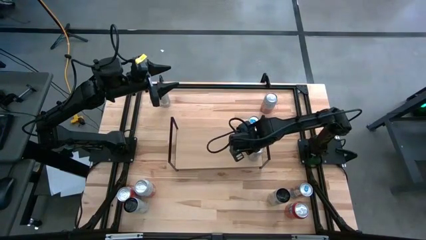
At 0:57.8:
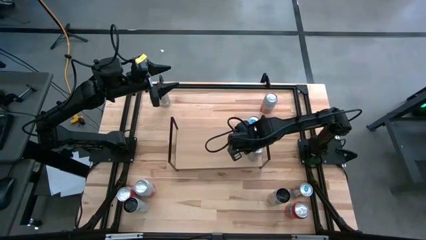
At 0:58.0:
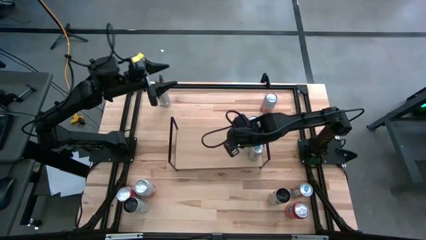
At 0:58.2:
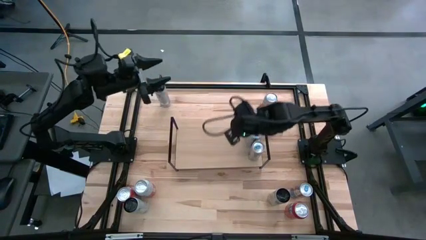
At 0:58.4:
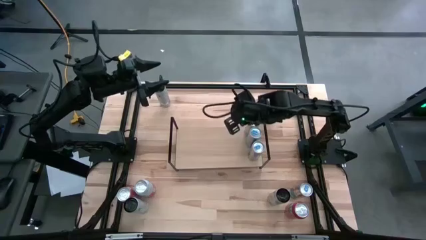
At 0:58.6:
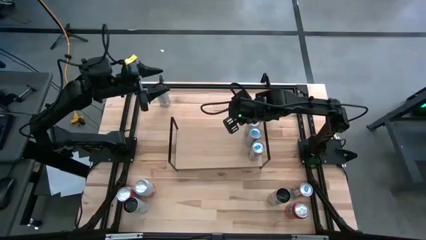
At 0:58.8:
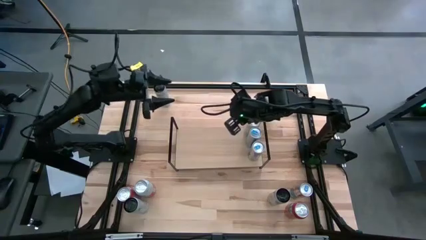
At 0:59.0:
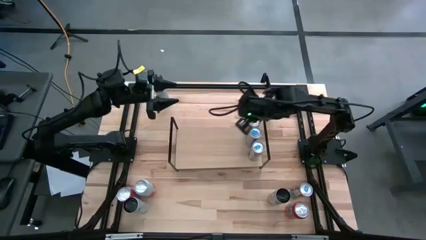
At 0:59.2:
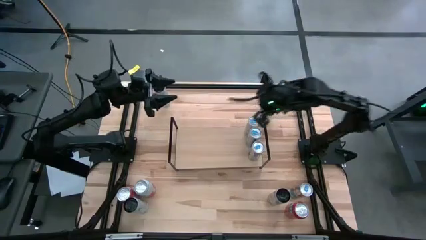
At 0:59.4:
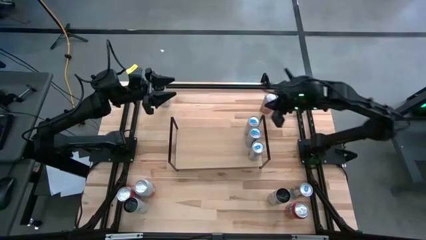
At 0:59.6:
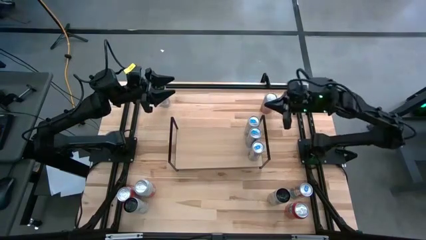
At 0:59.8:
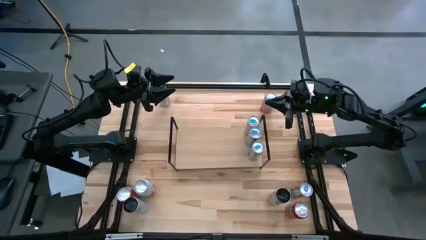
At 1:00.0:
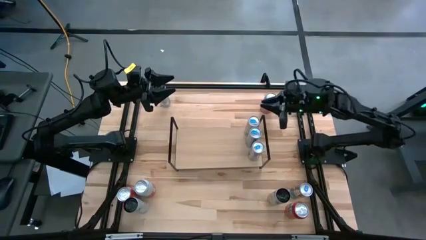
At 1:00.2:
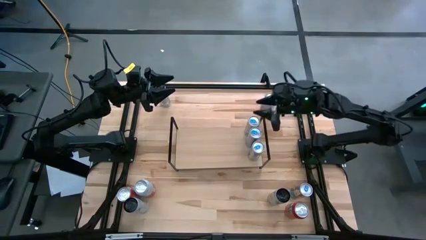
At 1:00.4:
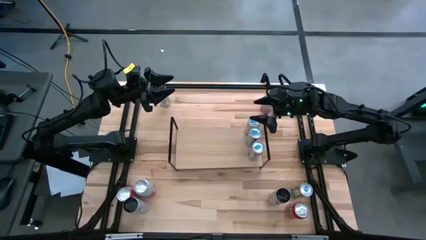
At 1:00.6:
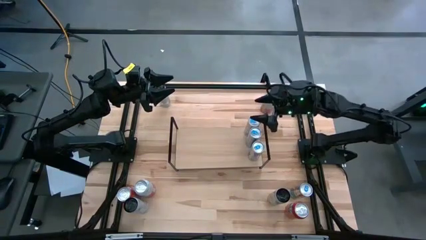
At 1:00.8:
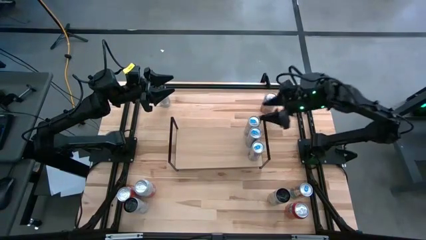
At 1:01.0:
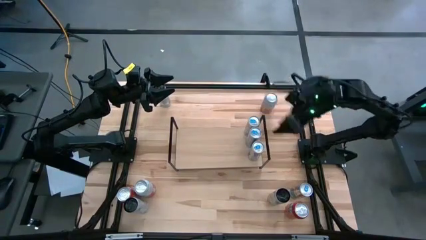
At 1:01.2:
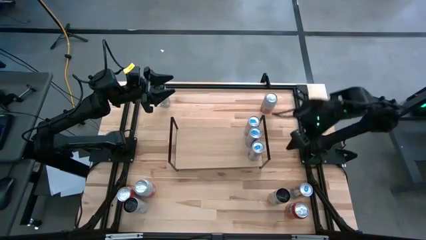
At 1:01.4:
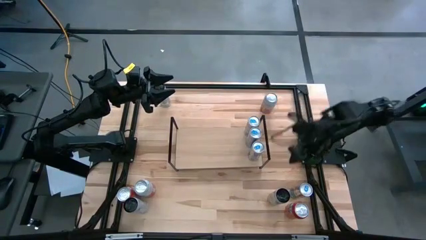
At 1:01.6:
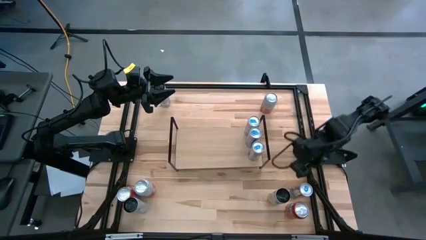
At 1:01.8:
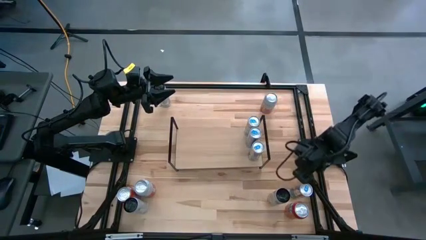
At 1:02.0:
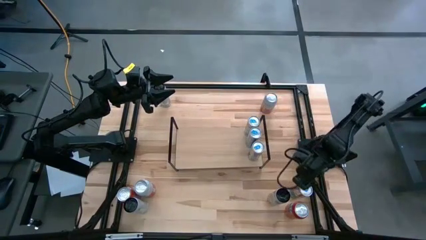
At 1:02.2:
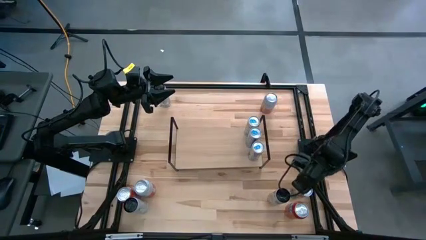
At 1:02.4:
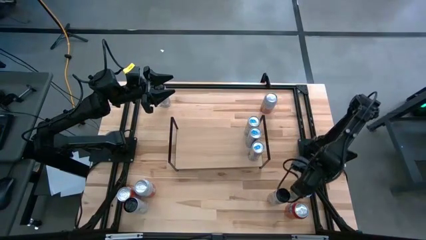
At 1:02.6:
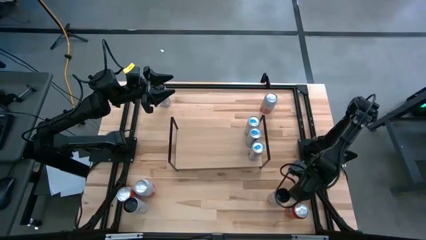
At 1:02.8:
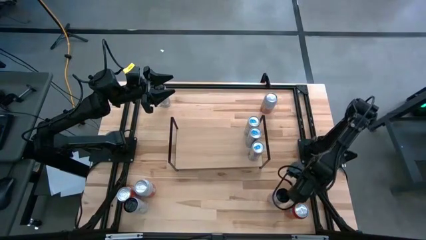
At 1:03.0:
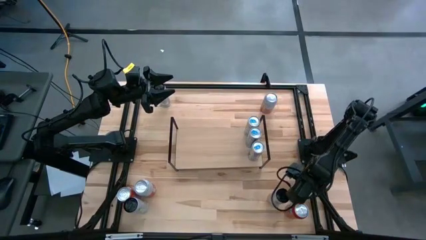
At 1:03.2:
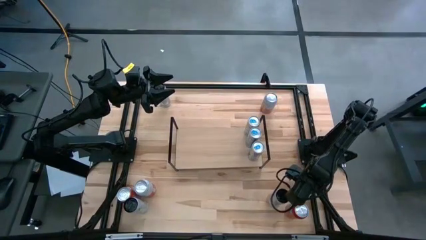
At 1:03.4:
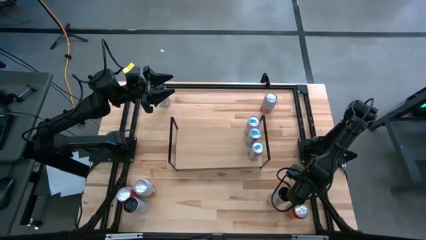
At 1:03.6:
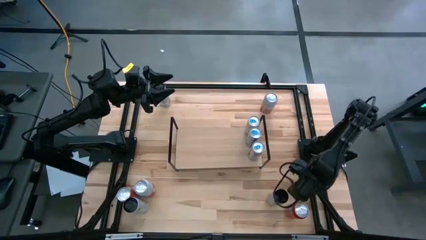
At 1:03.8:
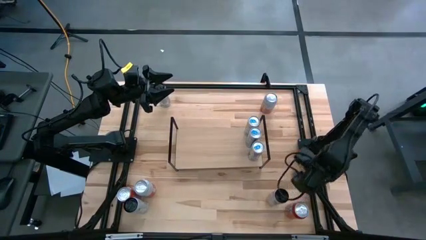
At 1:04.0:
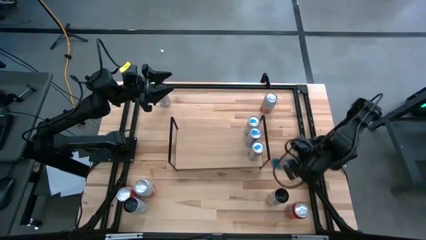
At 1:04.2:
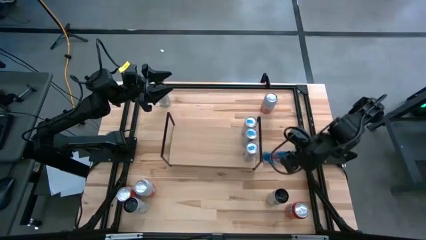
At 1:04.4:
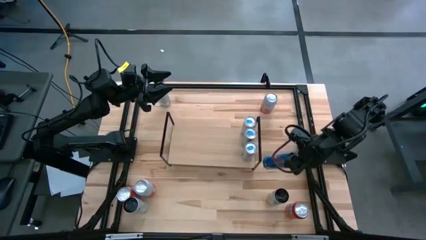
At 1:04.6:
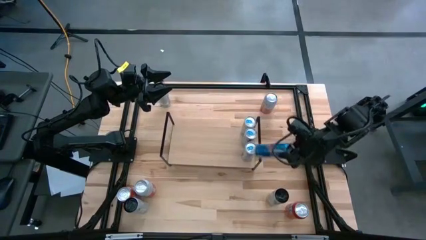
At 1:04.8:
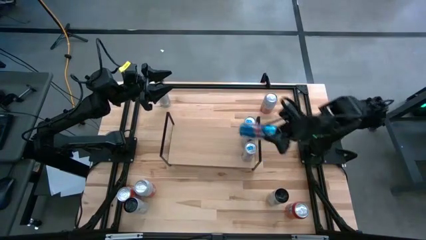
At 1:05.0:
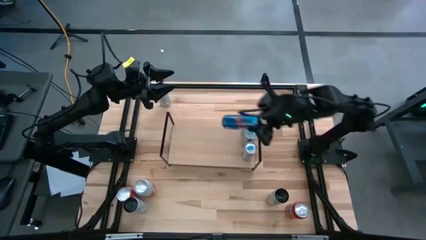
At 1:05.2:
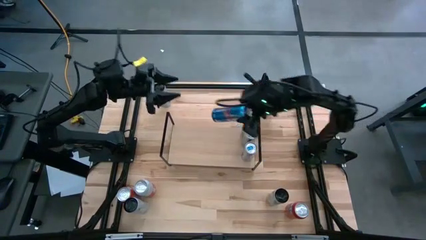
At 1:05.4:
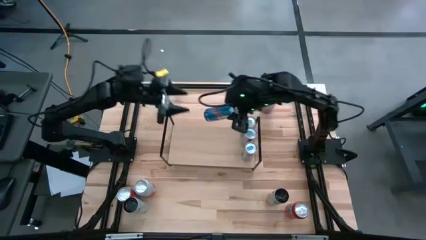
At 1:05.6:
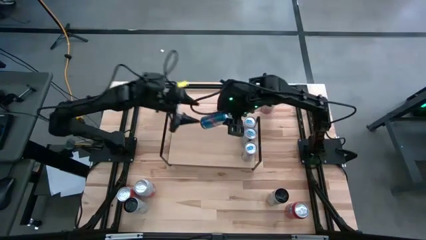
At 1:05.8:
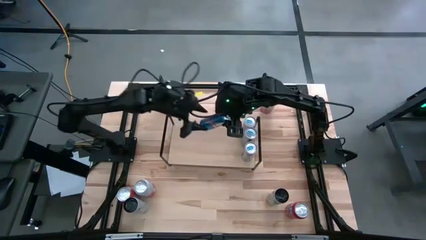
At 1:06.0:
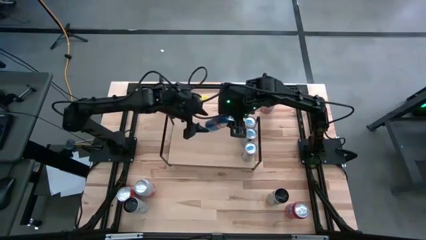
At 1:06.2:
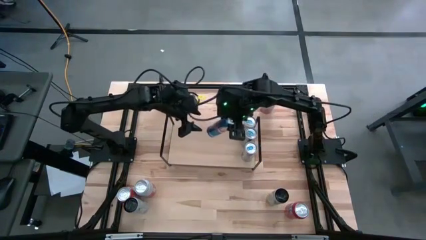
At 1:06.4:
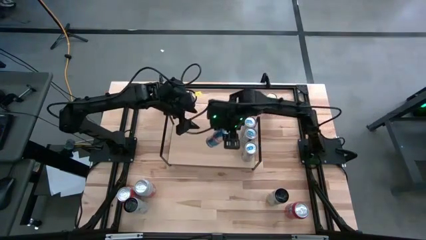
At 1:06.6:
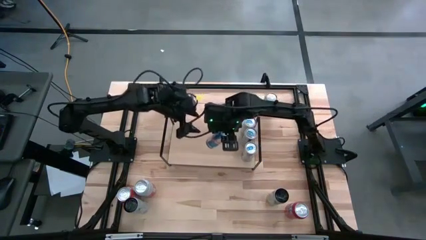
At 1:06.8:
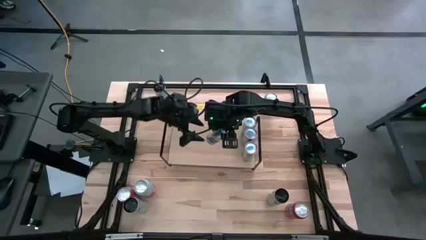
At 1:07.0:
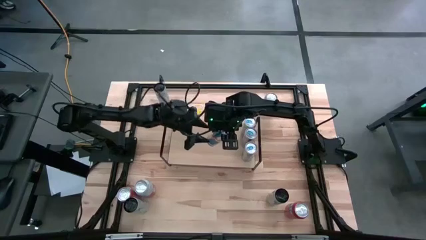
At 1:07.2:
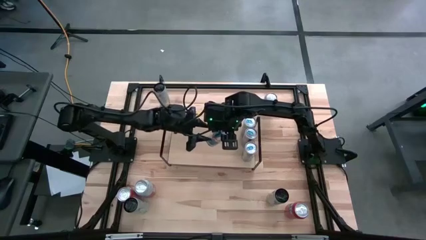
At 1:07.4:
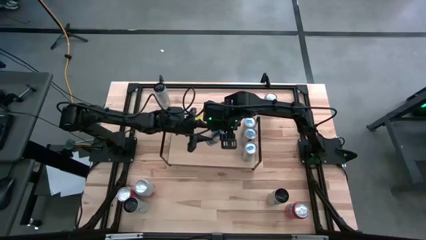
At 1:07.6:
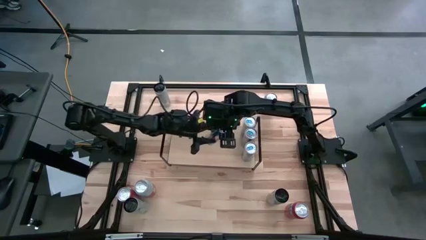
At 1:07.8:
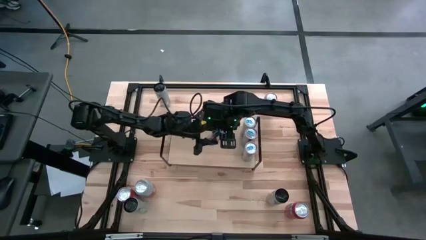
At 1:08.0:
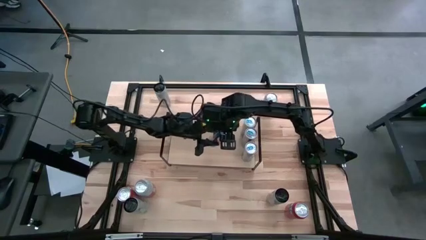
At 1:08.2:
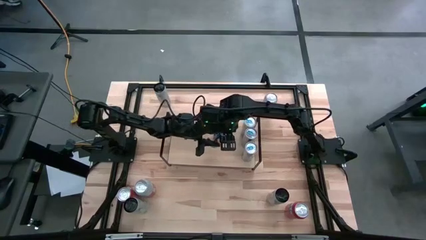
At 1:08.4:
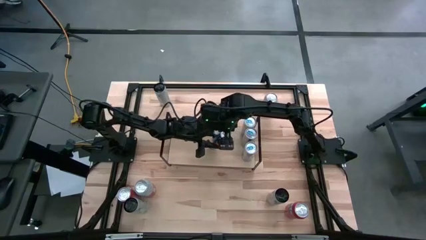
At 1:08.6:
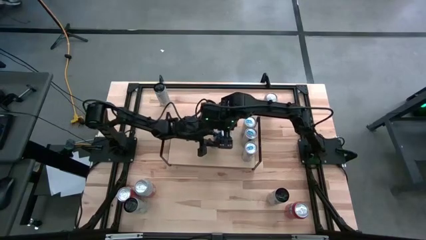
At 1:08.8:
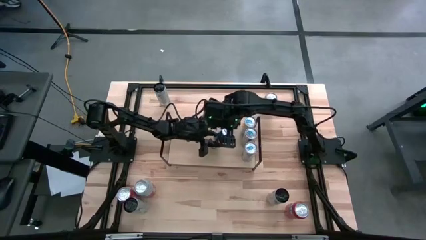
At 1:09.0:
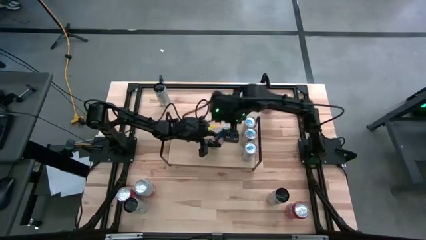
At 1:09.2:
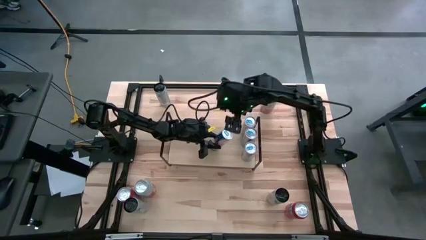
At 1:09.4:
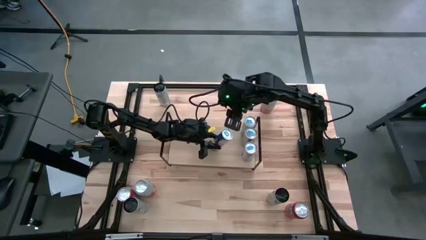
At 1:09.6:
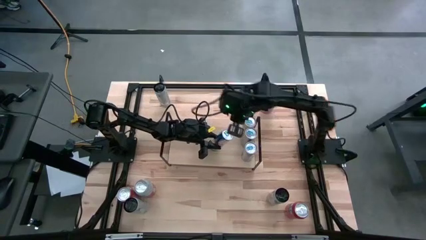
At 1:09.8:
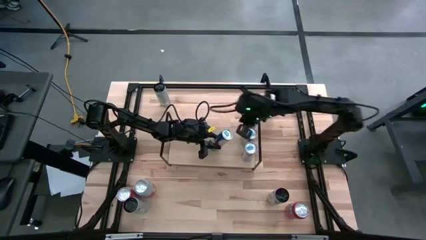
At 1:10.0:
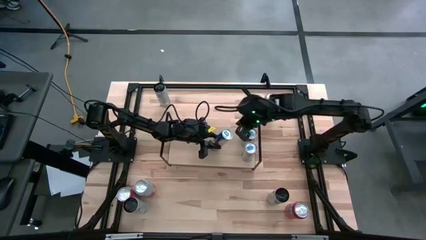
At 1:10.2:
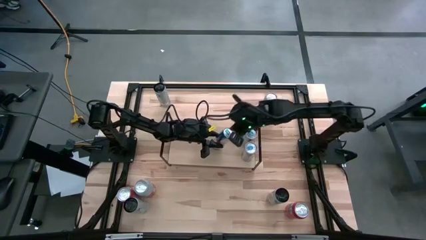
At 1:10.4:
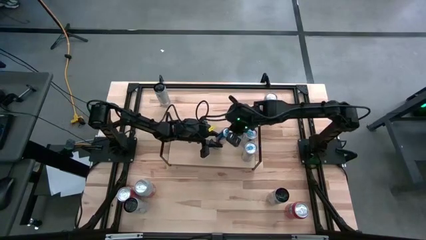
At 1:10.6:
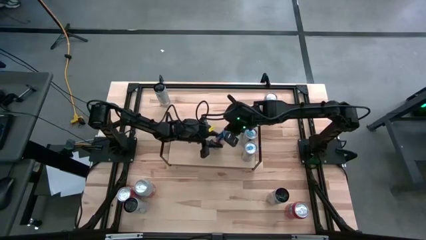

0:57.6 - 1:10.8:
Task: Place canned beverage on shelf
Put the blue soda can aligned with the other blue soda can on the shelf
